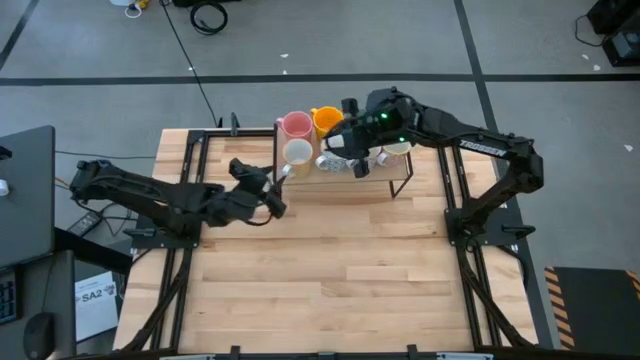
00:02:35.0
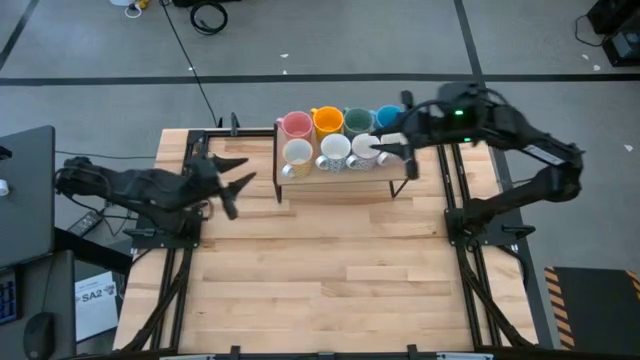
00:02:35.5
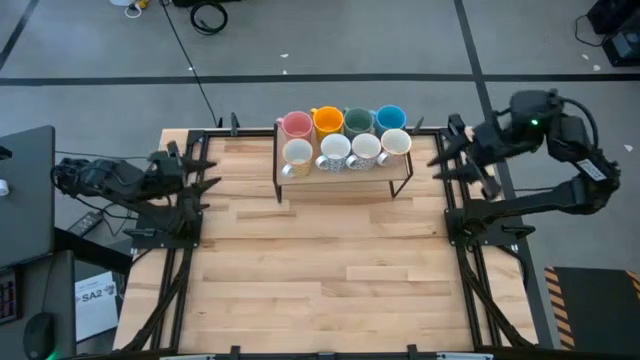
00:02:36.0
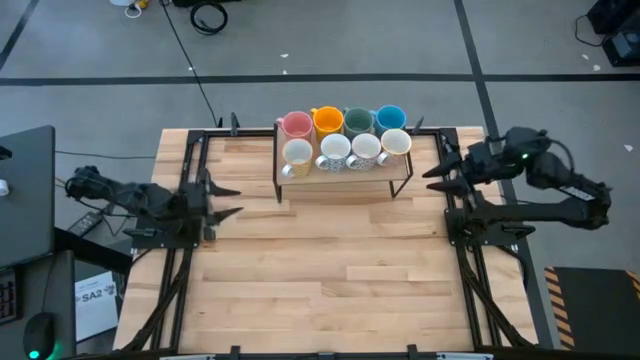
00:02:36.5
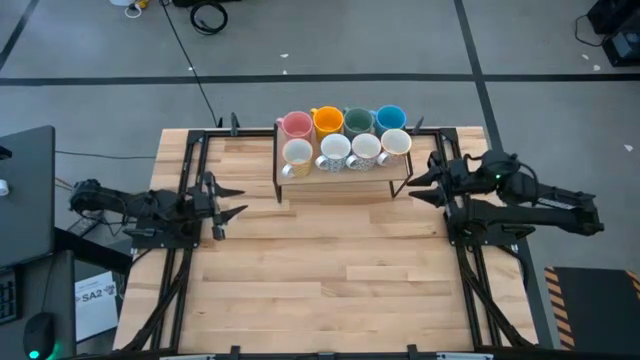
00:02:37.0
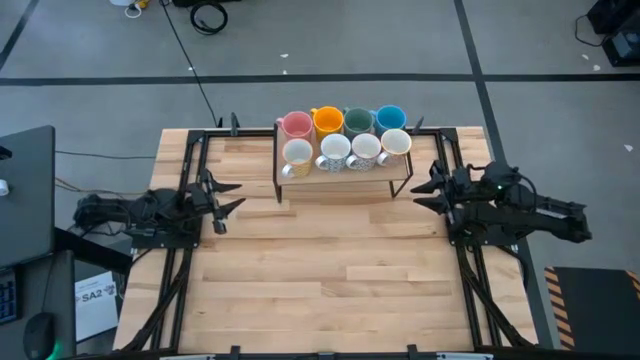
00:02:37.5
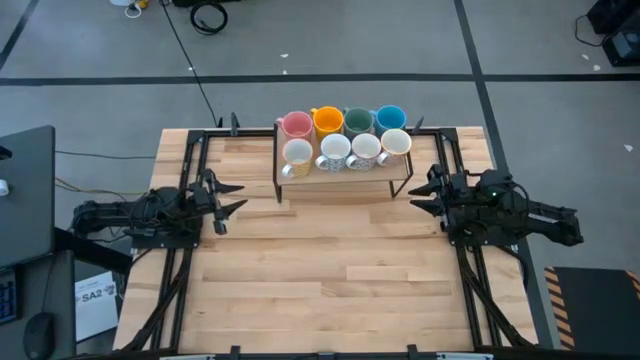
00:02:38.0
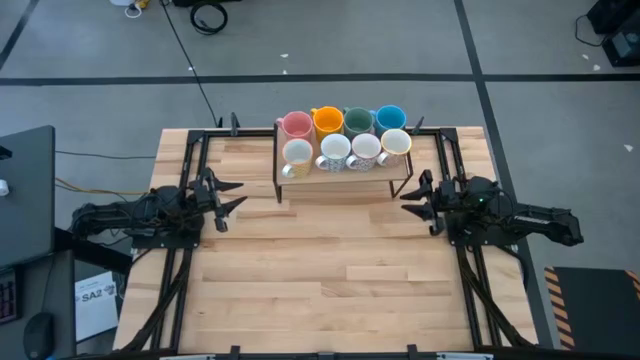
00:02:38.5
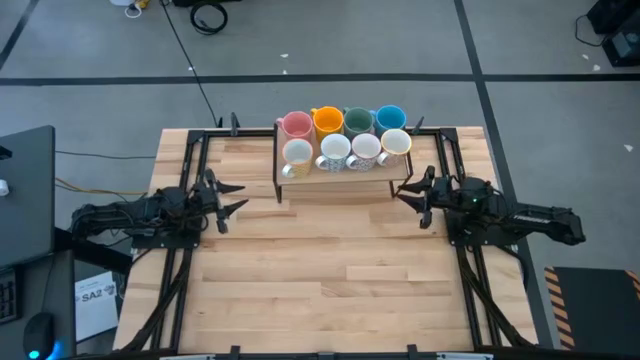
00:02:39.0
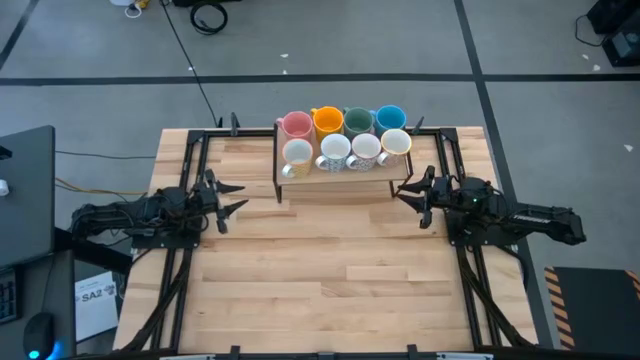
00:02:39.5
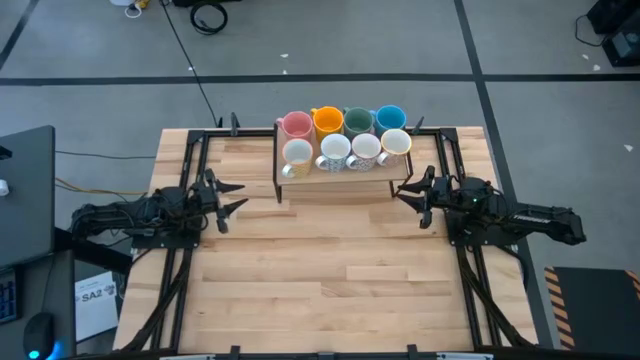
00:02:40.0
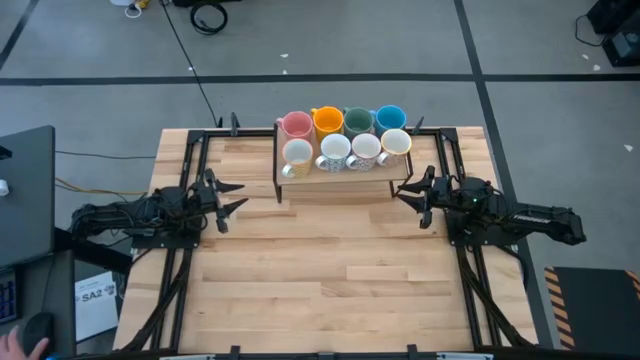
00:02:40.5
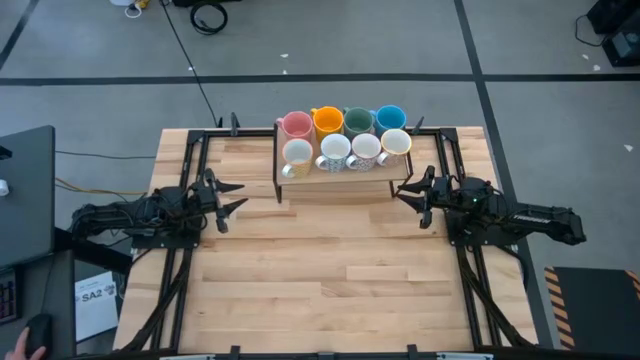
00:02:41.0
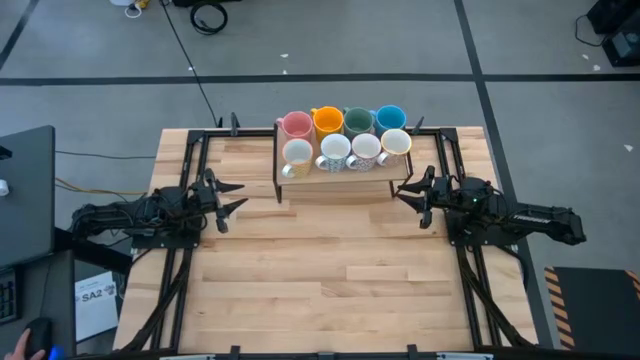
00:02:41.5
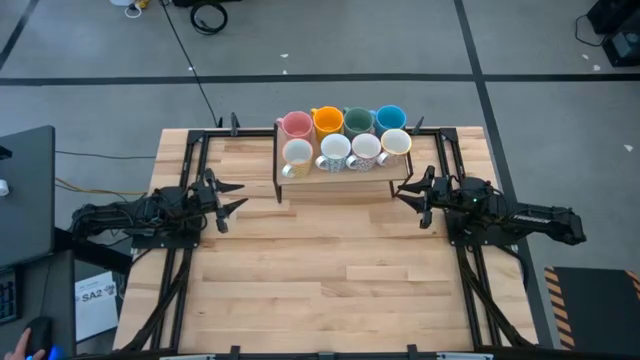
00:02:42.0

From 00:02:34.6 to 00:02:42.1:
Task: Place coffee mugs
Return to Home Position

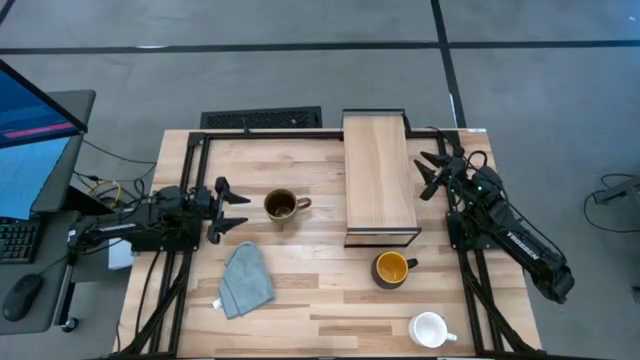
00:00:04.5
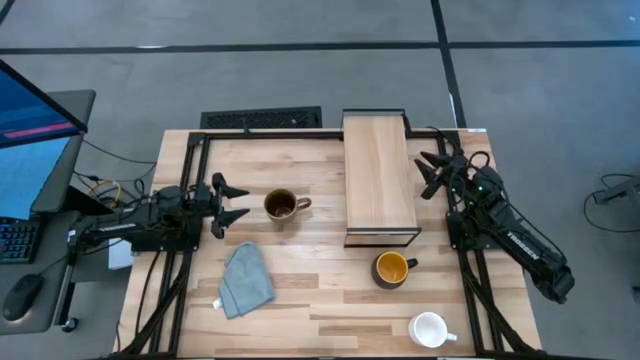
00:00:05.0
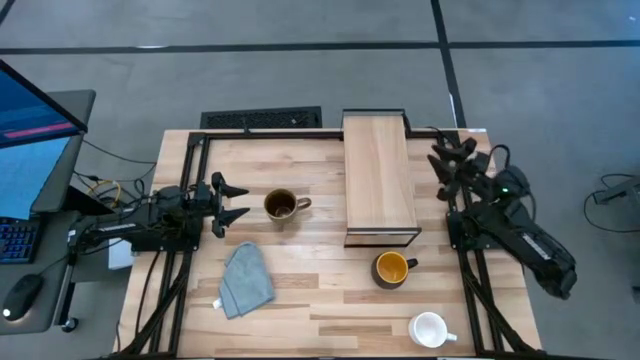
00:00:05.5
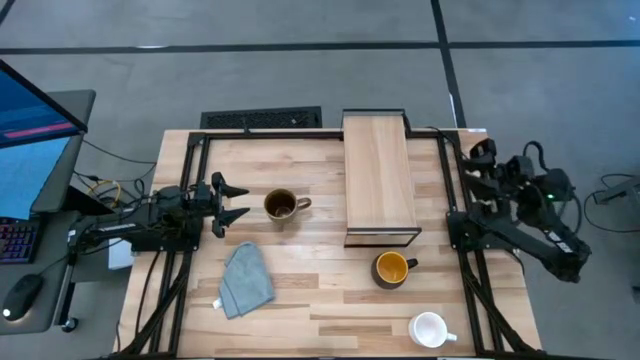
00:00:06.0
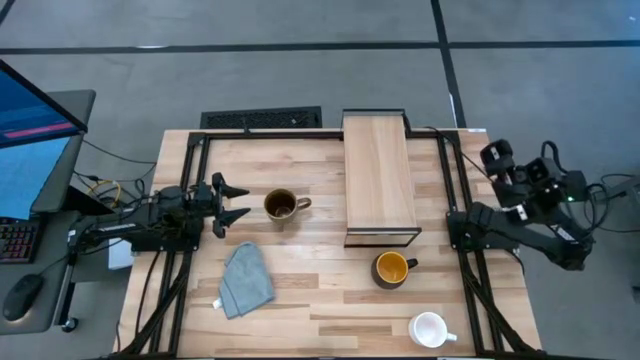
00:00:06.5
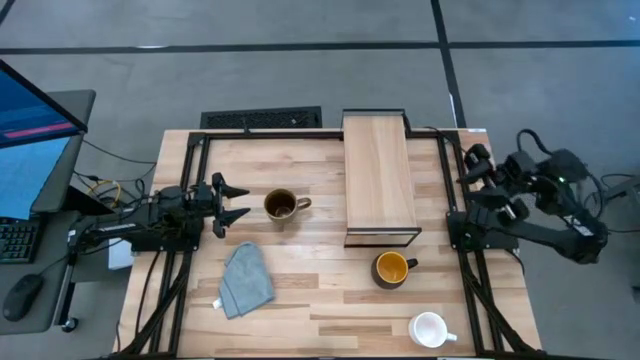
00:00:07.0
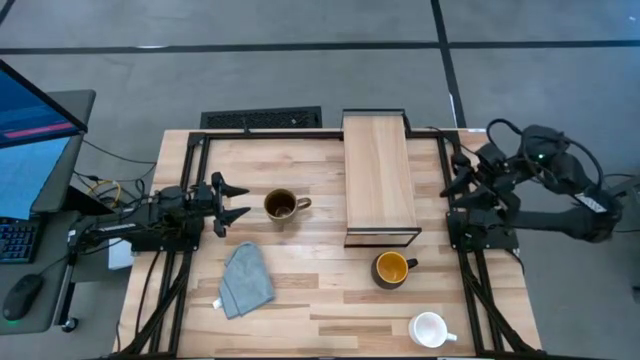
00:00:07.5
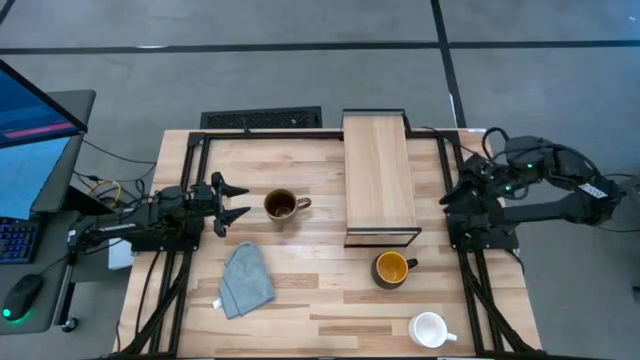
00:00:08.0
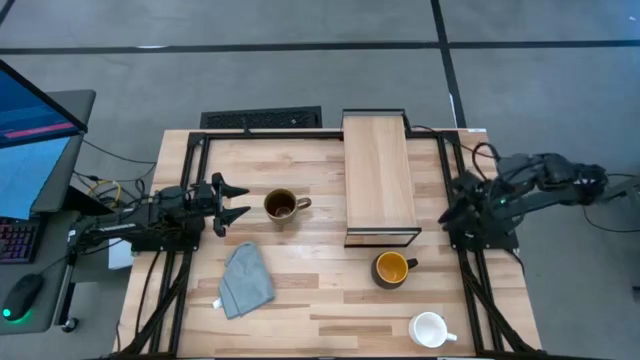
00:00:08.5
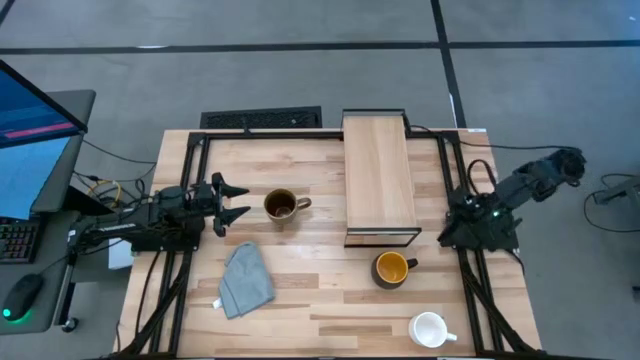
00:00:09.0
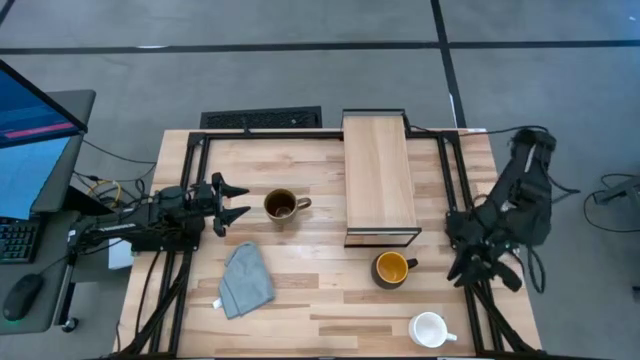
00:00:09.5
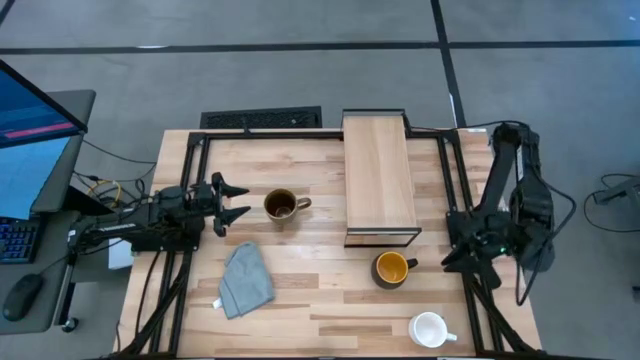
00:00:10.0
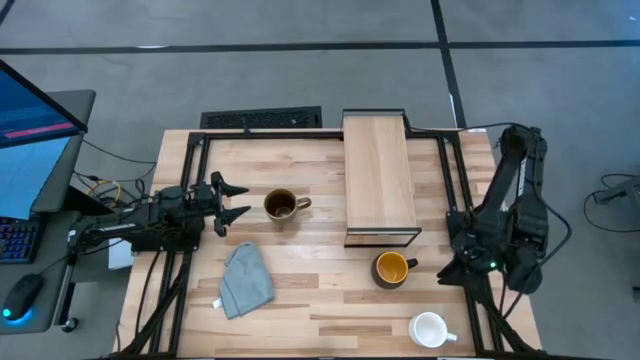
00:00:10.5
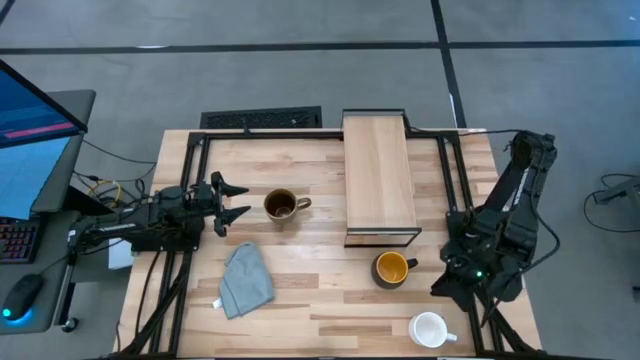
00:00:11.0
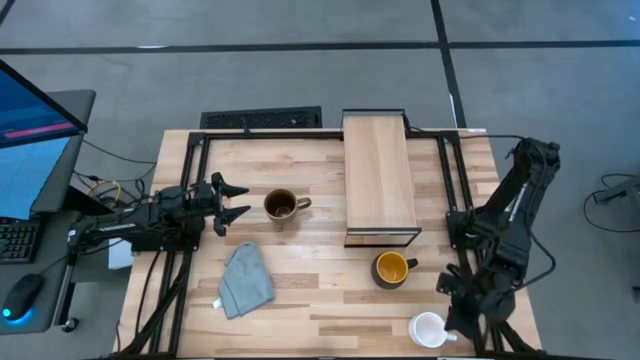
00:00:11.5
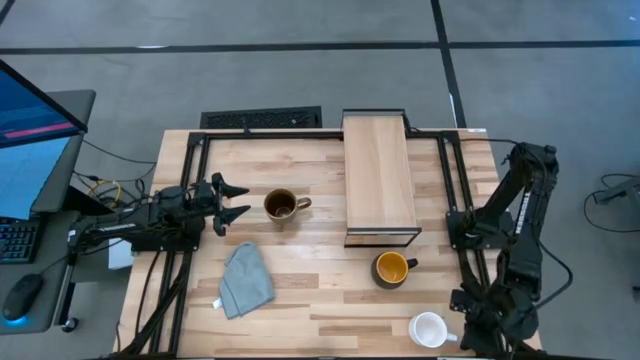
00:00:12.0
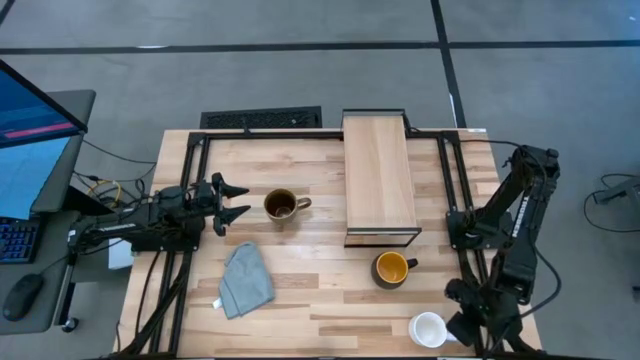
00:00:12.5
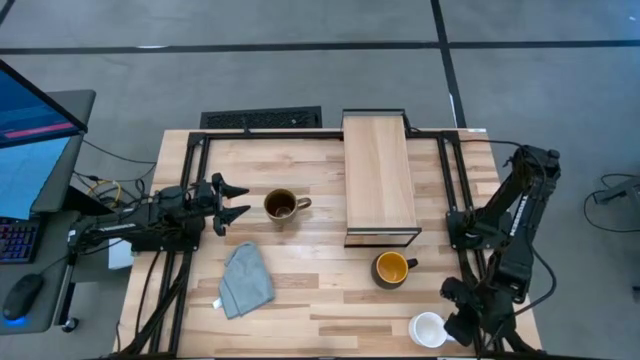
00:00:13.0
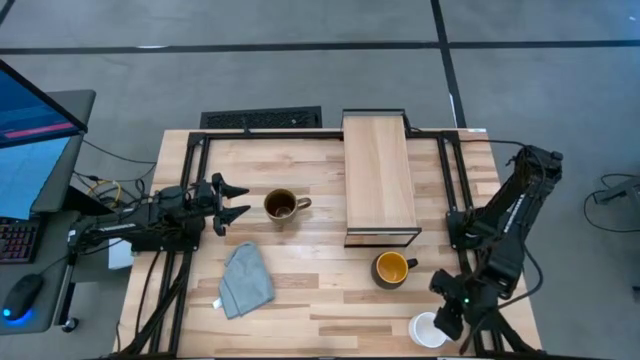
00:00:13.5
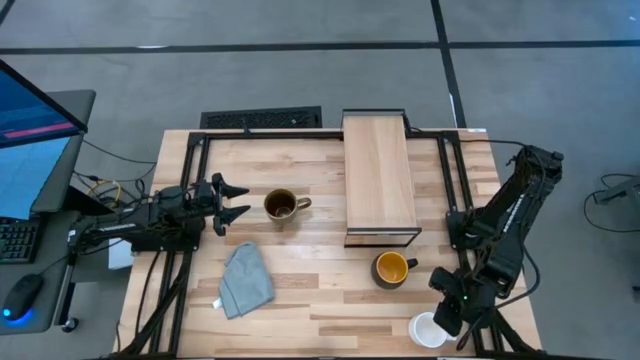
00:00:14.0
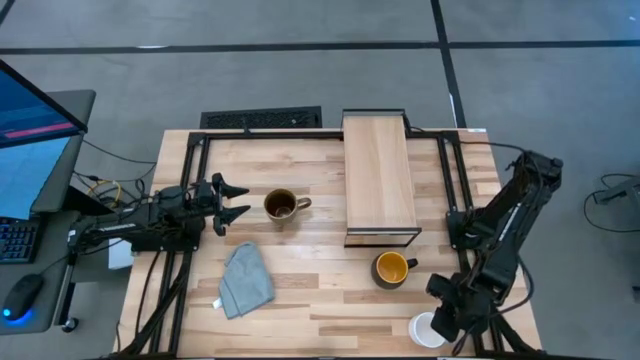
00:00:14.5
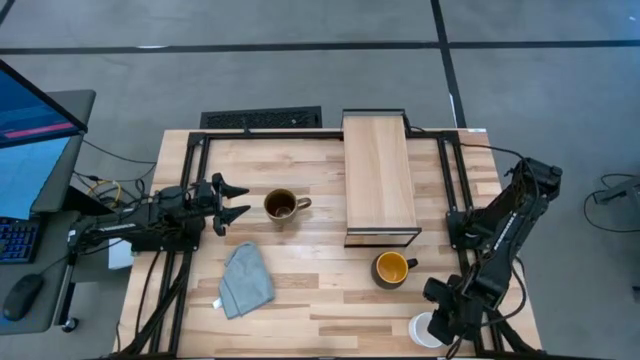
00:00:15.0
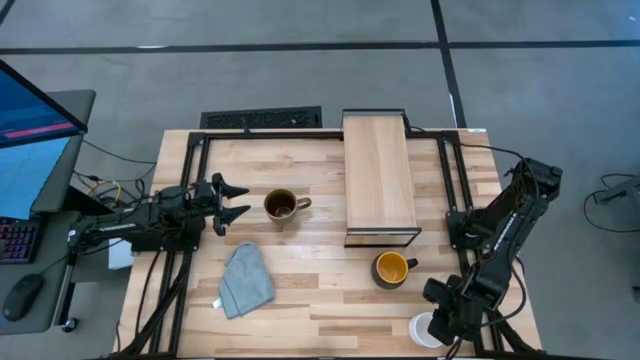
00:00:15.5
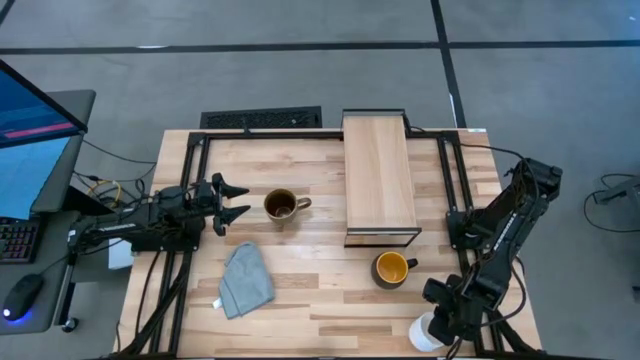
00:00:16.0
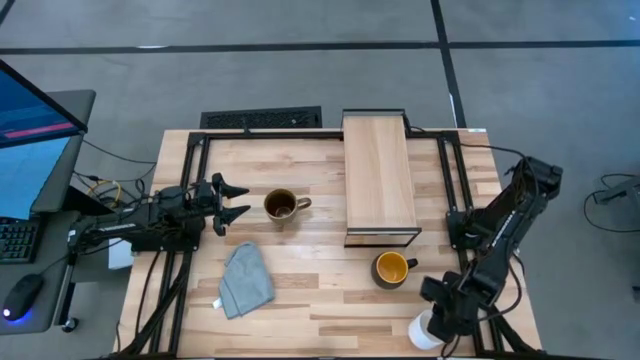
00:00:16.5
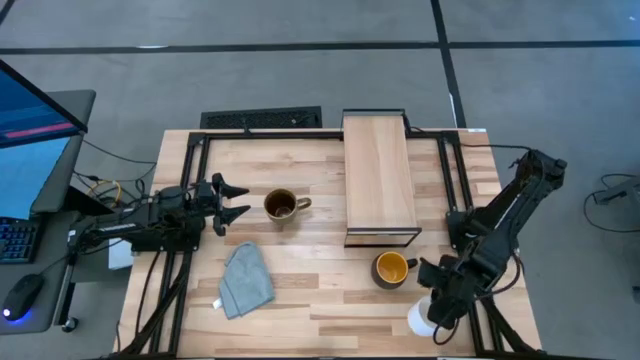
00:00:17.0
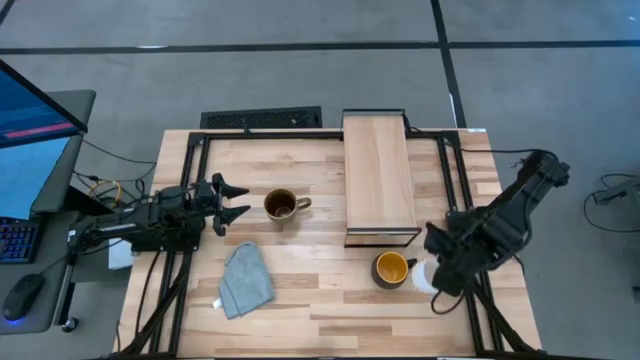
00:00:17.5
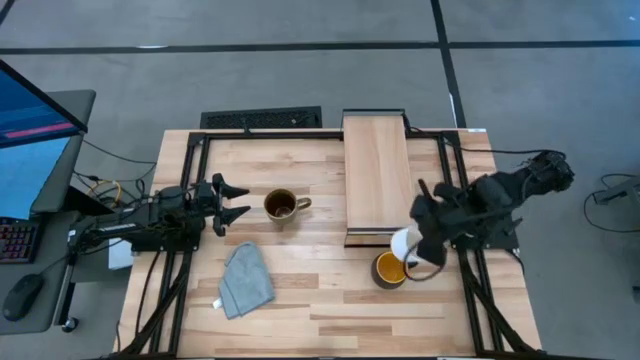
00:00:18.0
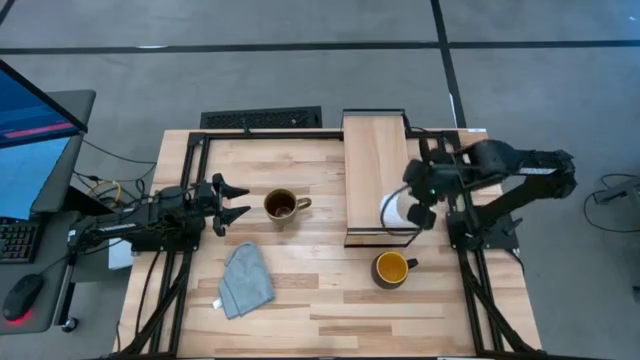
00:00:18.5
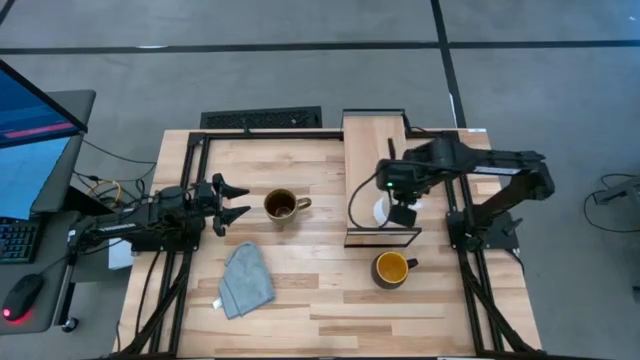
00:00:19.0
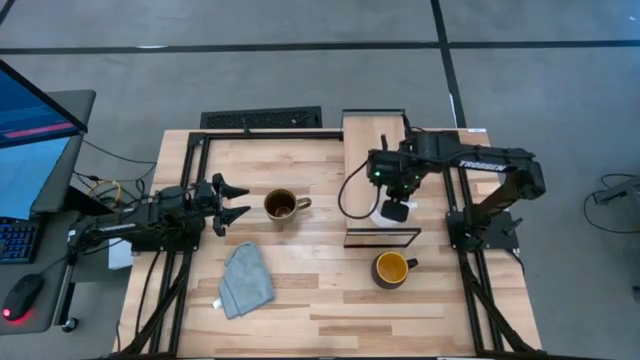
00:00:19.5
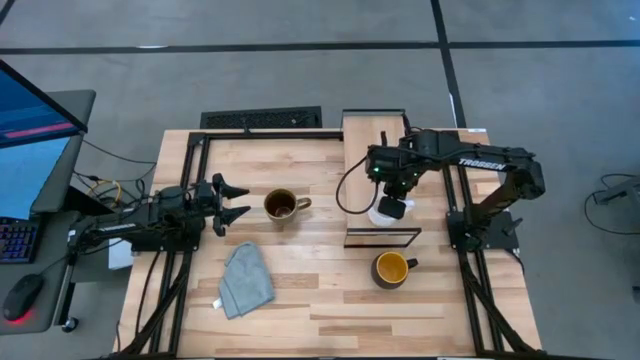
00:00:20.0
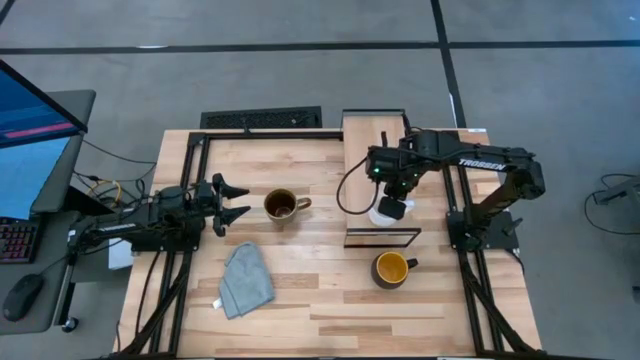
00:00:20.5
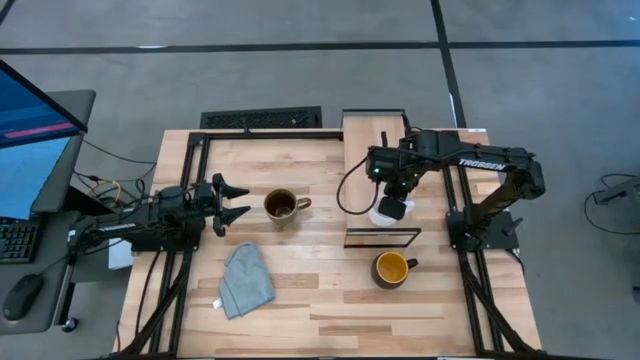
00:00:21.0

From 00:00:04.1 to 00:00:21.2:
Task: Stack small to large cups/mugs on shelf
Put the white mug on the shelf
